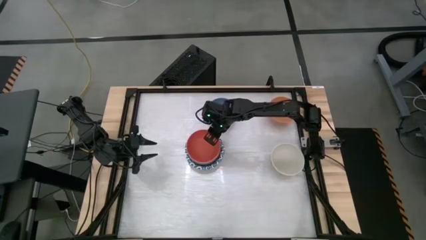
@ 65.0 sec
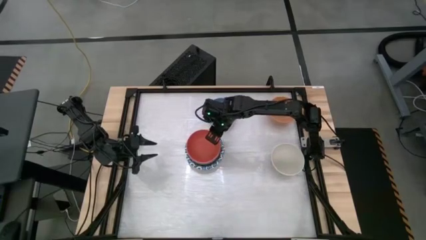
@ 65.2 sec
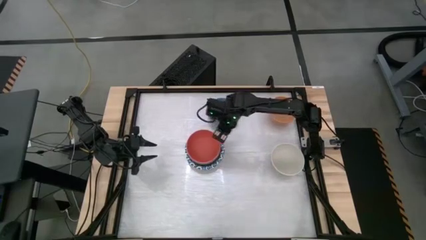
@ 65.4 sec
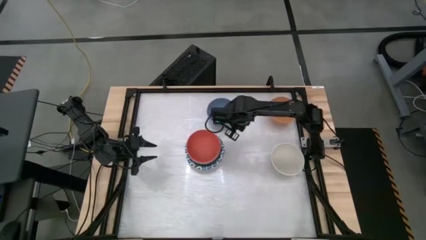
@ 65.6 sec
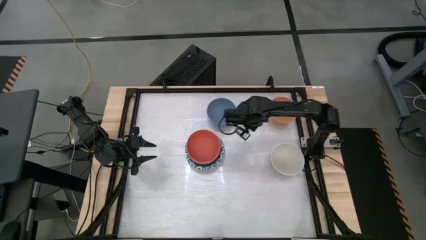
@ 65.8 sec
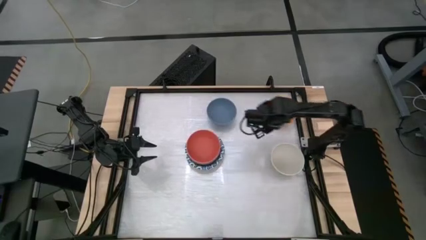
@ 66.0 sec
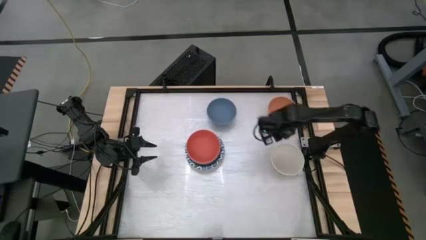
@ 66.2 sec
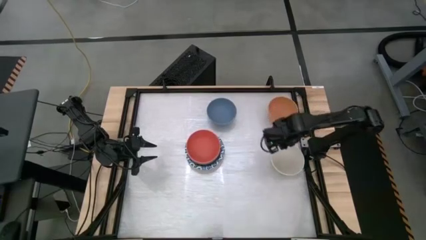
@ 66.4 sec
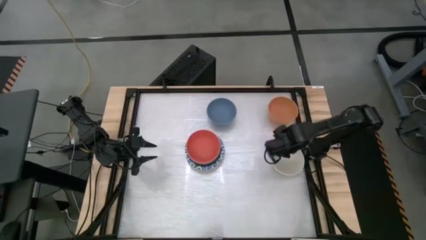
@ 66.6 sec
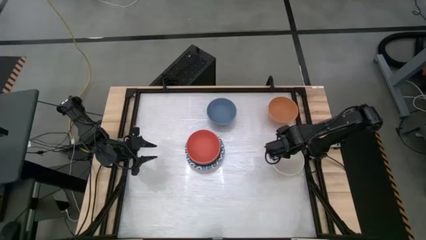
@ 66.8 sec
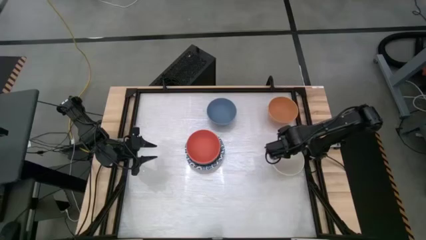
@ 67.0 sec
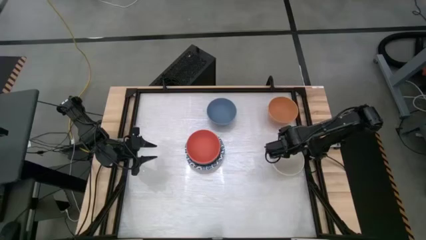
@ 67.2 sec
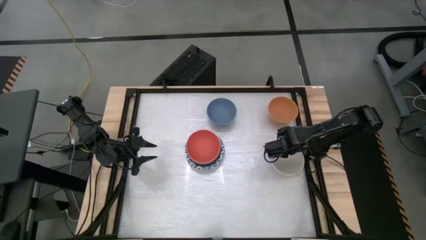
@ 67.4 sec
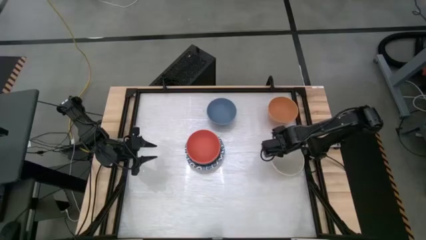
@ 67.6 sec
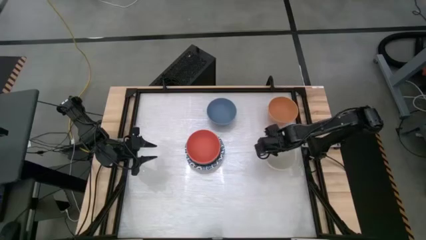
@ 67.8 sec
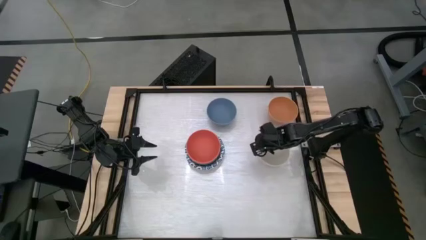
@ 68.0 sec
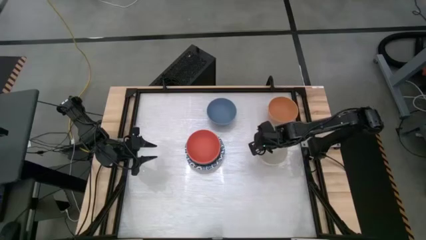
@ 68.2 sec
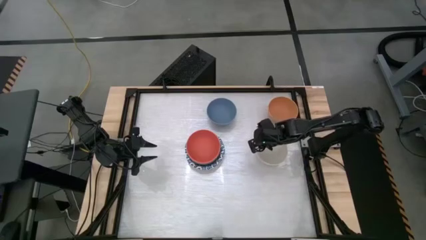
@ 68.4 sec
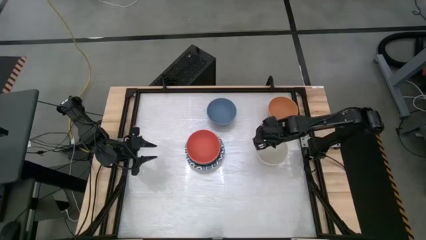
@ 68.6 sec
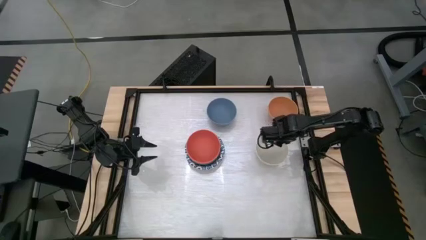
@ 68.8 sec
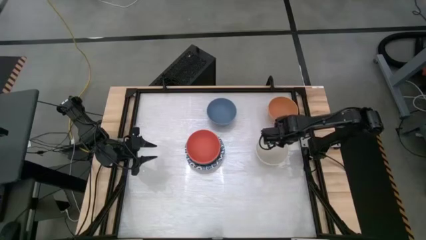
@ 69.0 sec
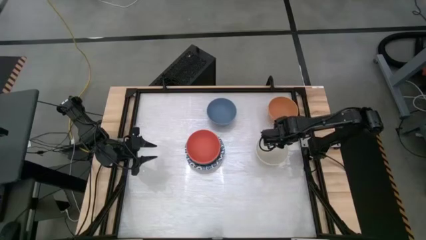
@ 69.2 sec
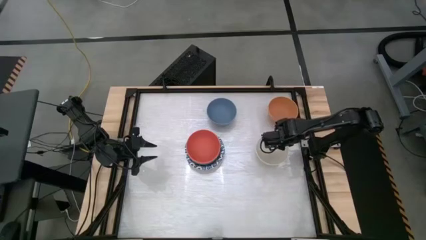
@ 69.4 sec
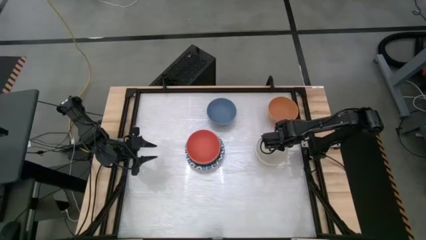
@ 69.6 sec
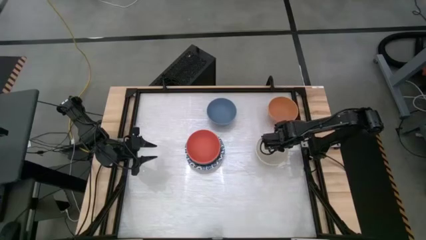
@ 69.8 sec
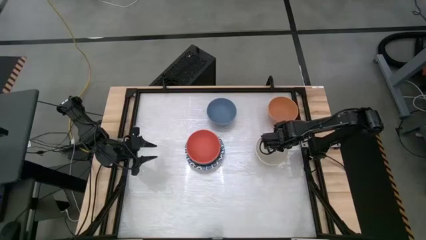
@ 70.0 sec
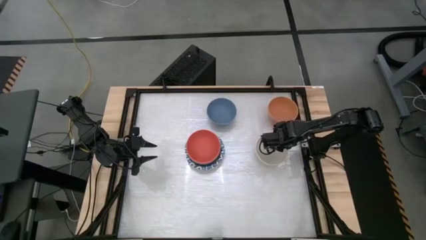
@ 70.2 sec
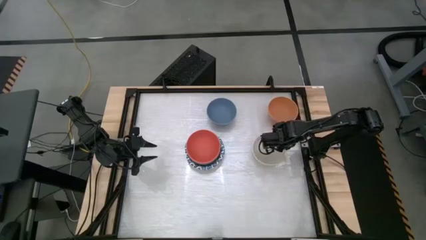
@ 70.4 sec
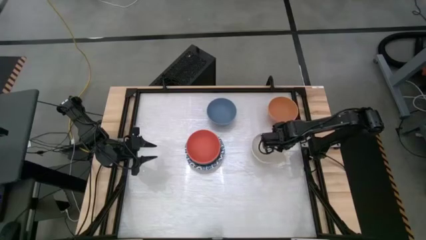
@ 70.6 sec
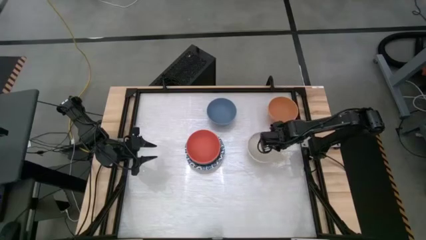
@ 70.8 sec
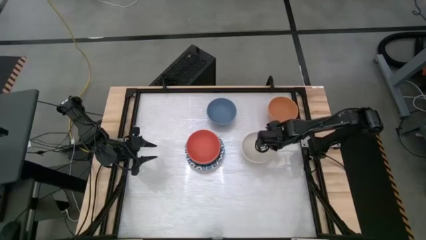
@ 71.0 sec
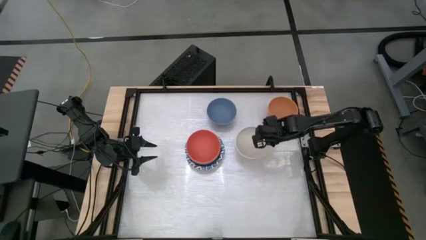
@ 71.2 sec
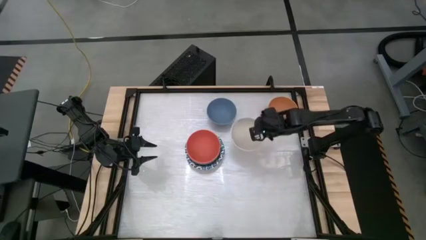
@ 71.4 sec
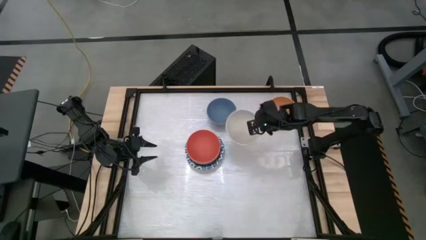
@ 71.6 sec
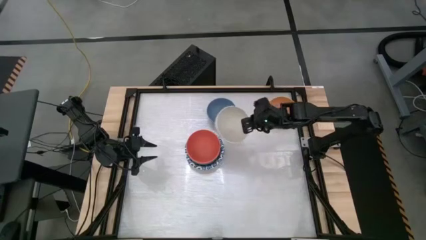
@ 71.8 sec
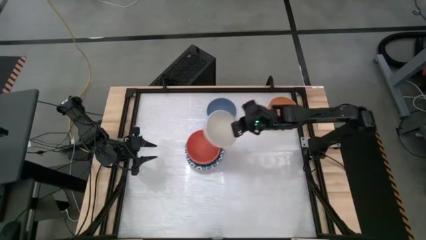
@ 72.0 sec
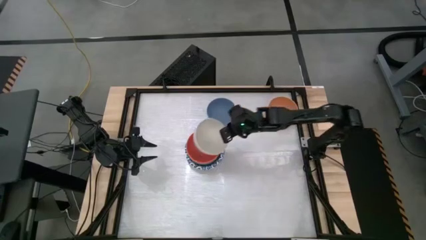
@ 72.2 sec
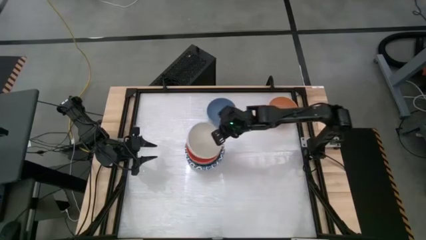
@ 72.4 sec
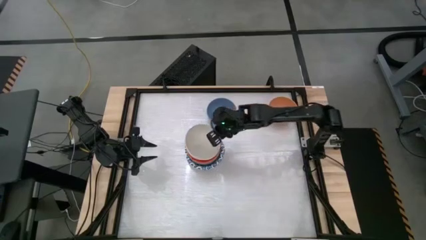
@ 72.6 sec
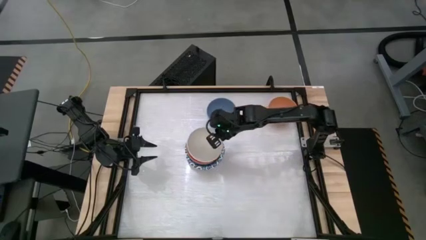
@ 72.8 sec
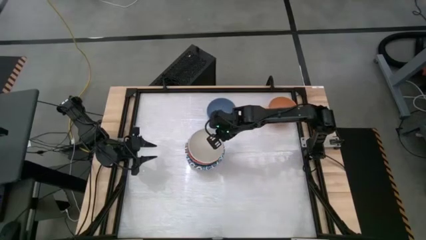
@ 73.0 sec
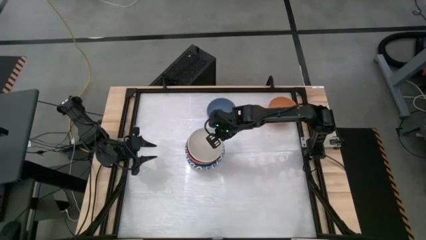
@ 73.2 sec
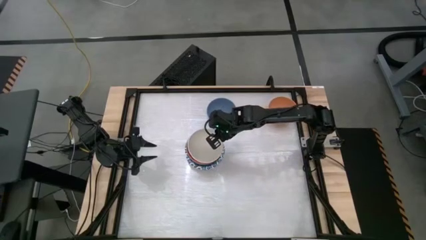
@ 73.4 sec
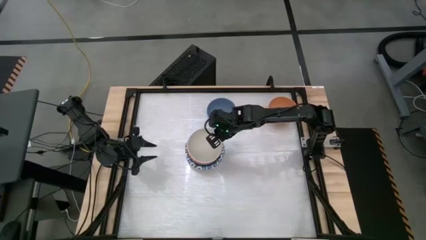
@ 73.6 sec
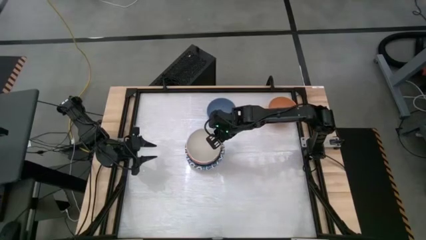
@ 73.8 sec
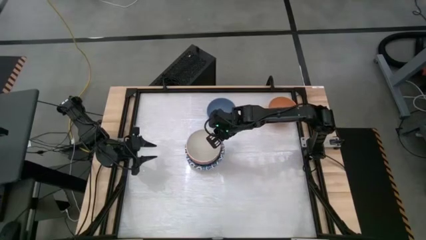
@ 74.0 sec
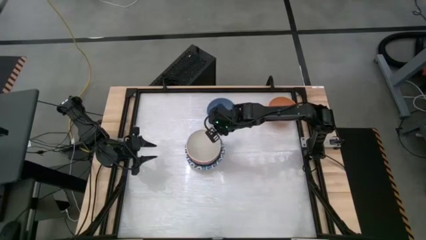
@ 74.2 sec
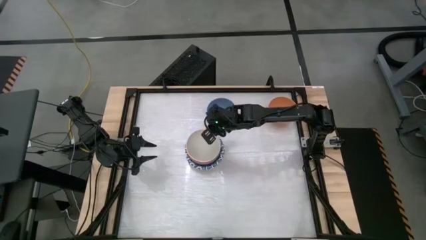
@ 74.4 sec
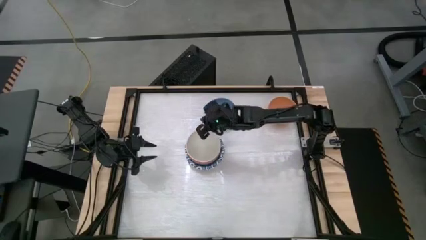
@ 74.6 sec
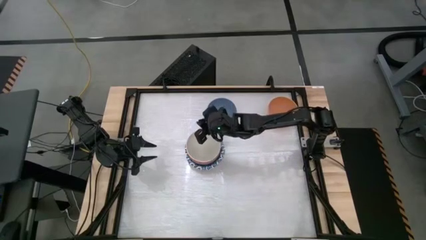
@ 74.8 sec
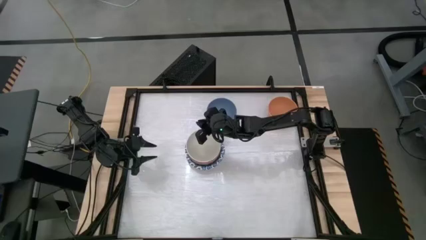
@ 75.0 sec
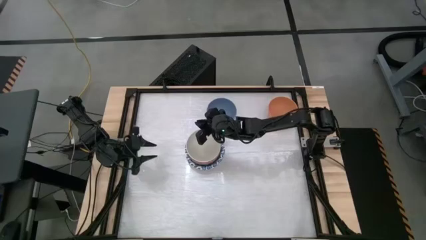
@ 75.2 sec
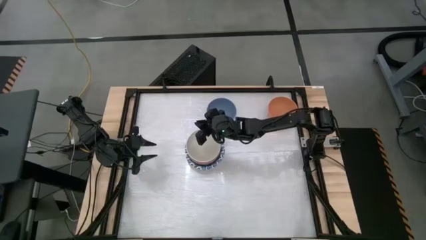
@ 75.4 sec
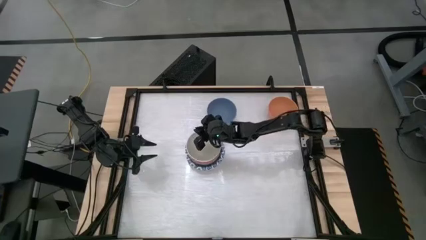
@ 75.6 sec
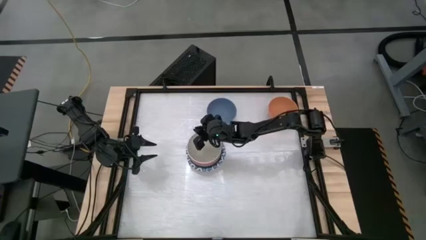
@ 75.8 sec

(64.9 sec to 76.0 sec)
Stack the white bowl on top of the orange bowl
